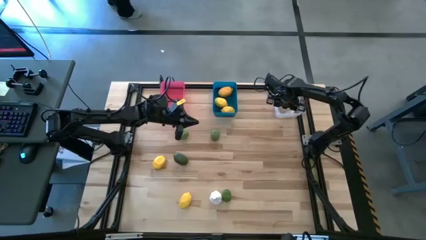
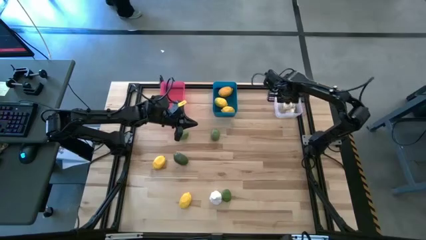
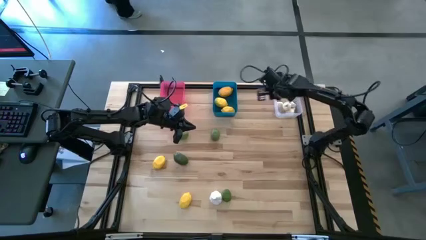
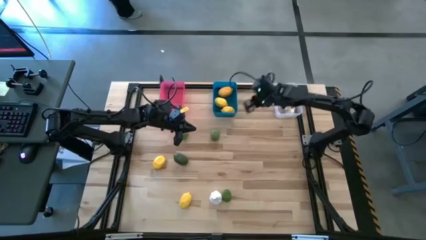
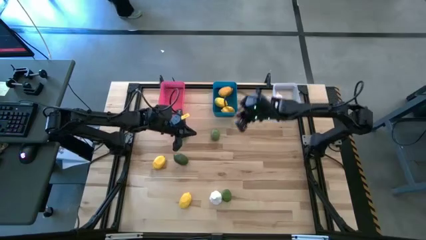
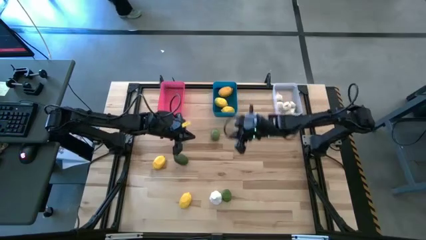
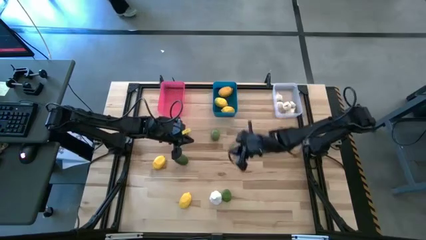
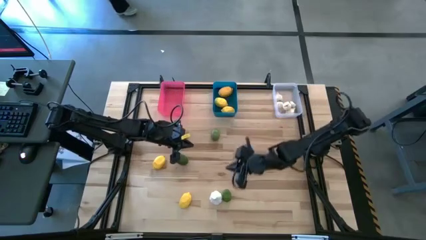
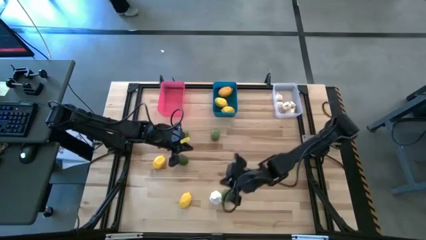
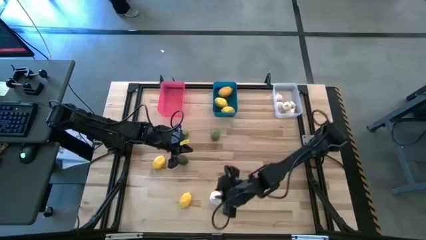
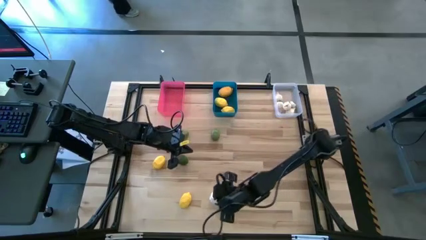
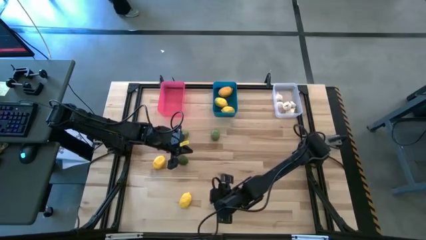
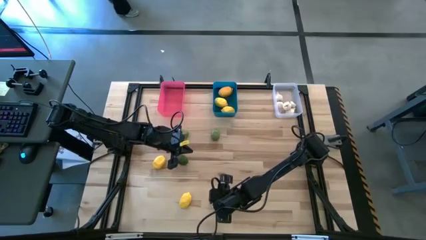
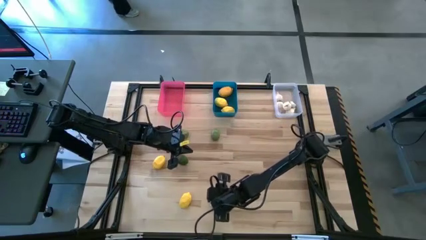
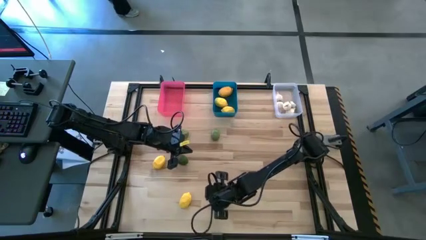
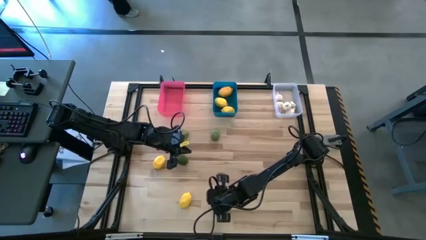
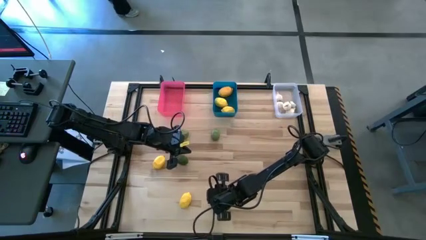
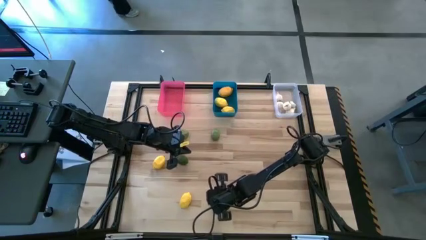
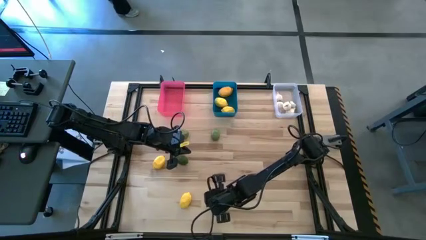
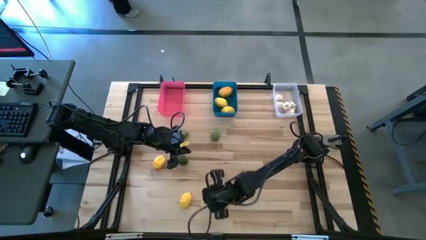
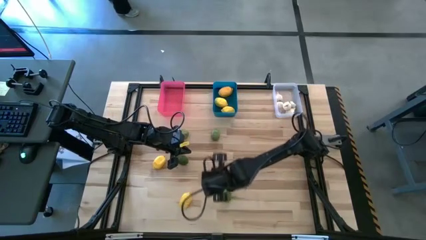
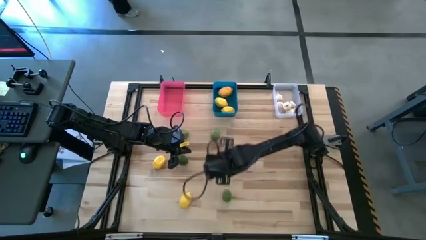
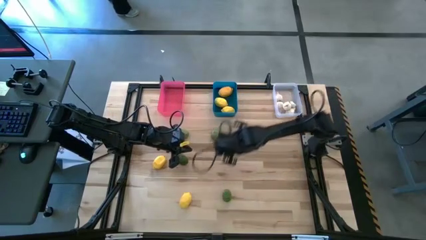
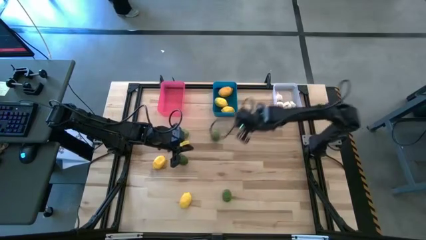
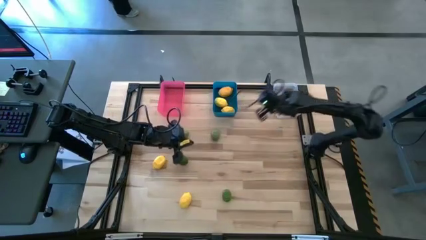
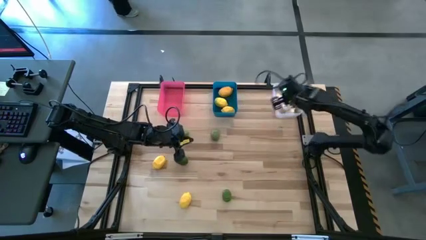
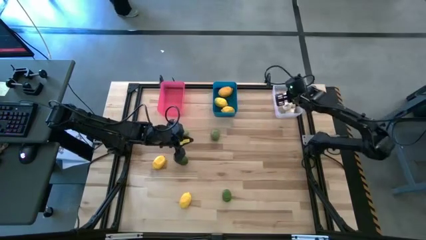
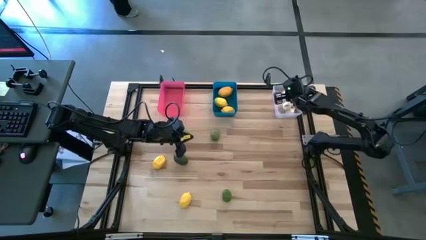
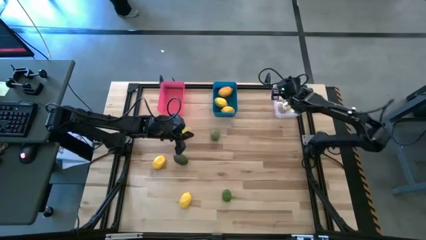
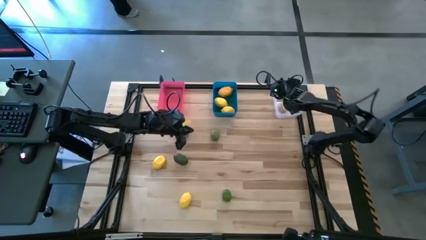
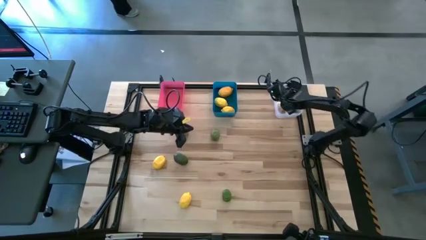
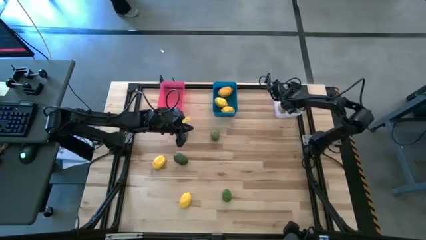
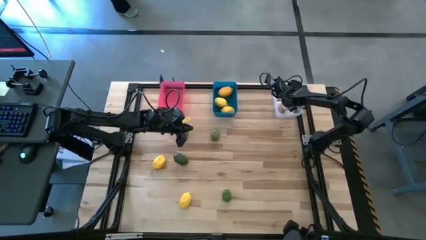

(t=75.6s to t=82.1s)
Task: Sort produce into baskets
Put the garlic into the white bin

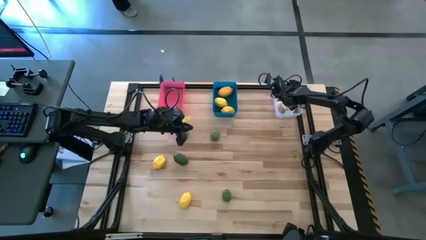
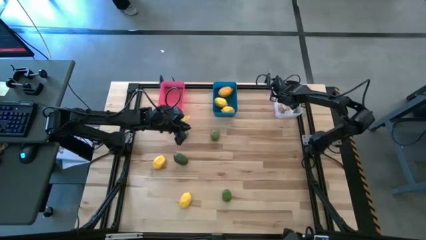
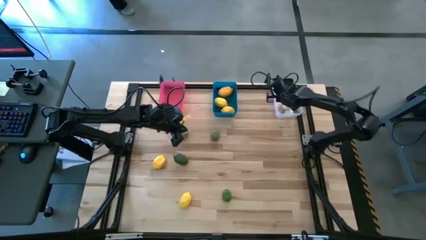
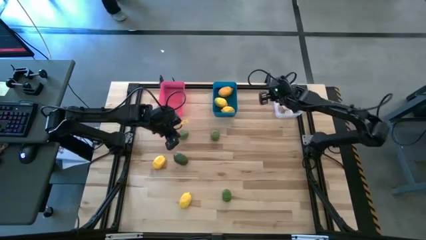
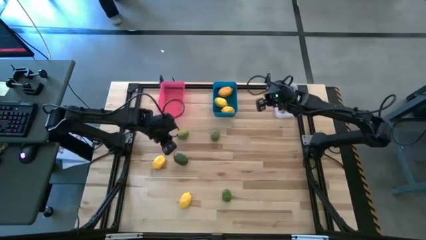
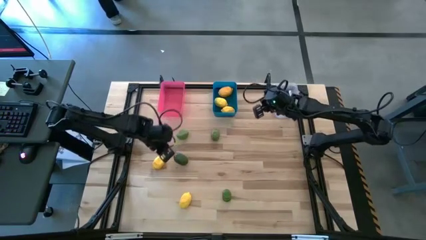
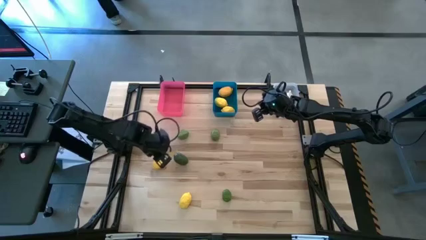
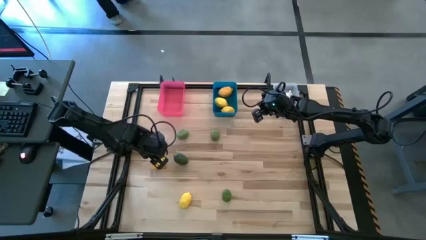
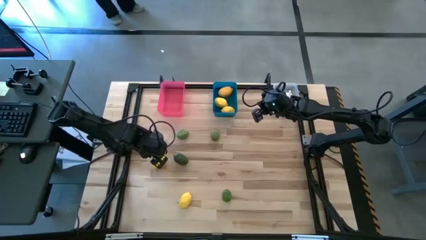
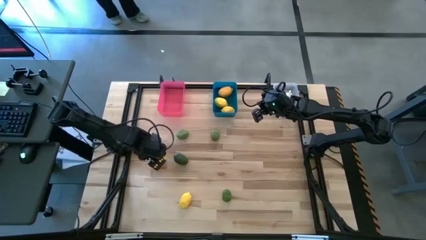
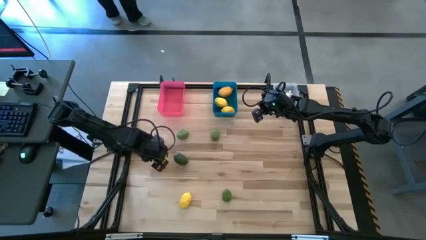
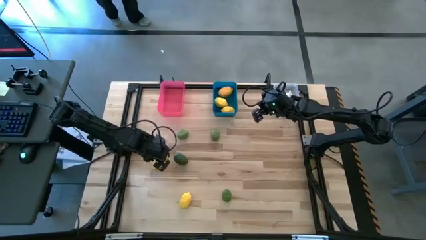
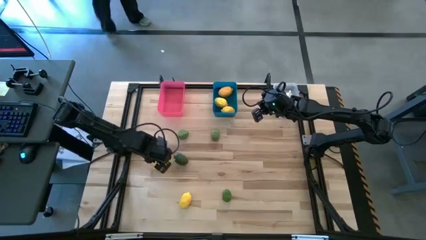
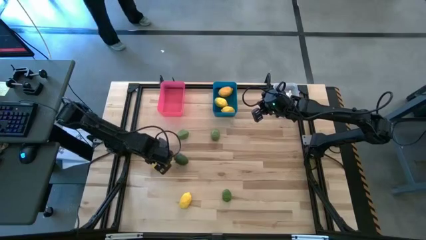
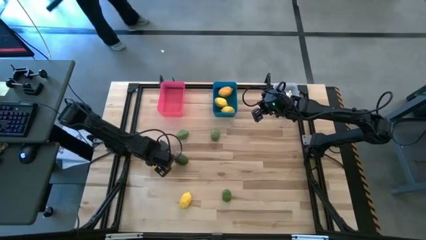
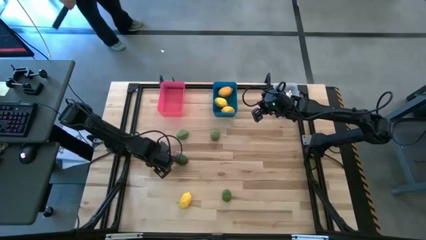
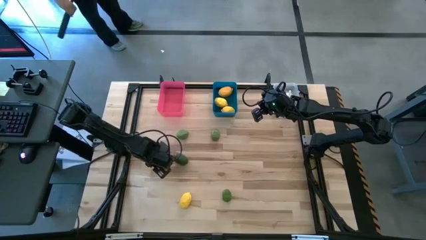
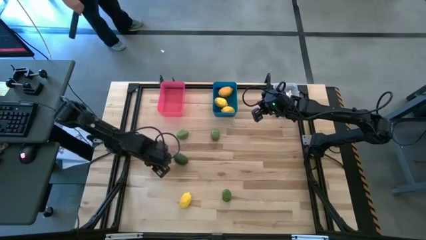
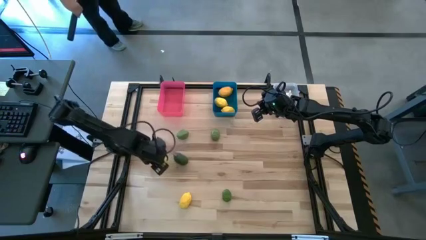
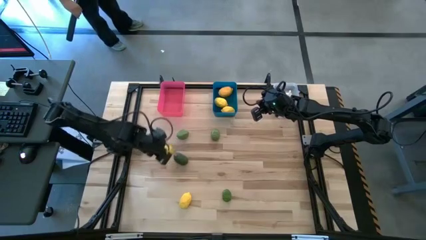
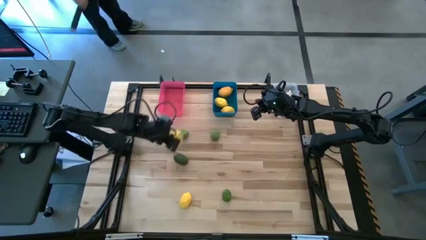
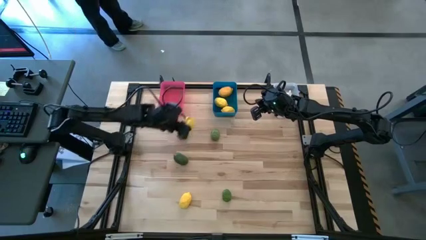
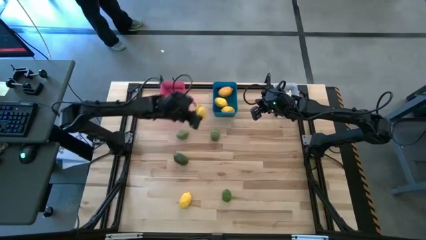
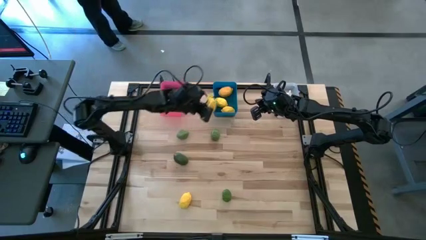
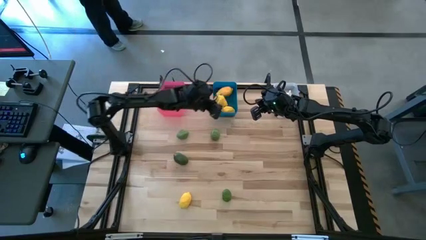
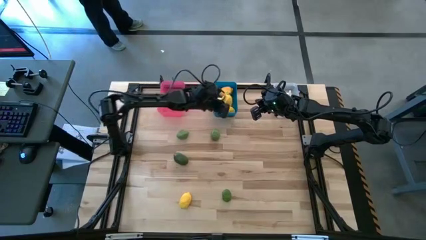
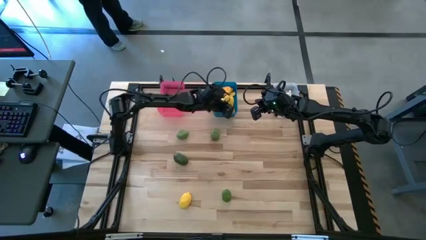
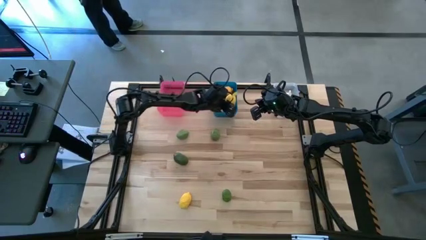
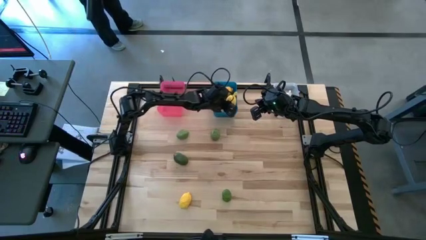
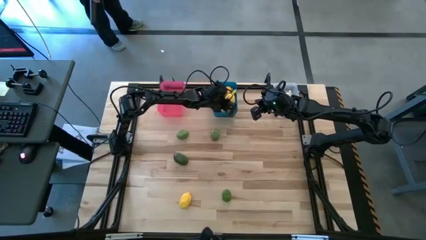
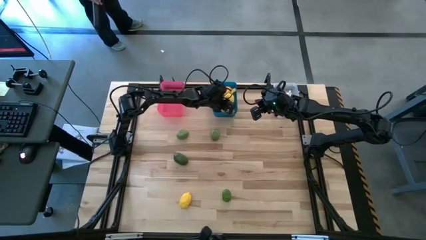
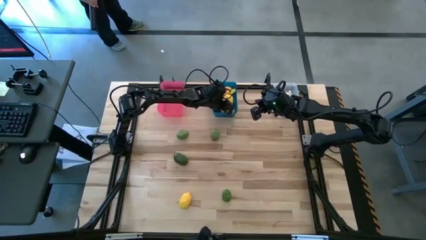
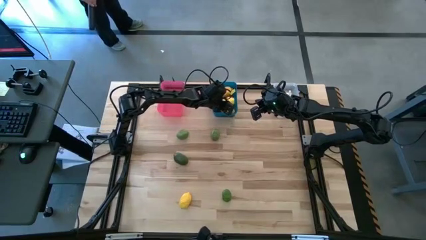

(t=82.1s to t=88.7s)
Put the lemon into the blue bin

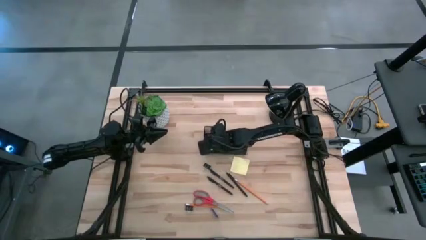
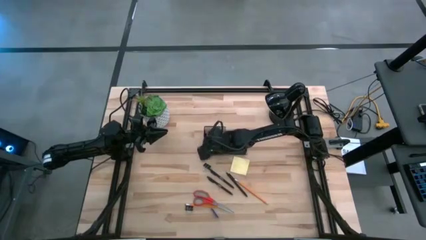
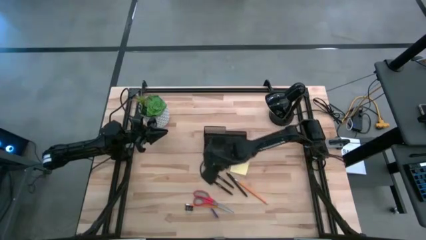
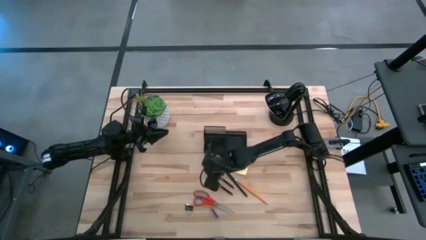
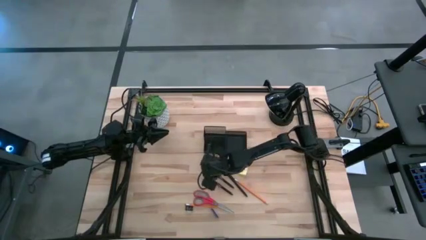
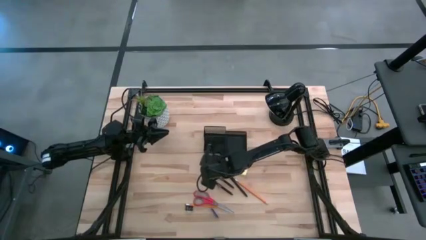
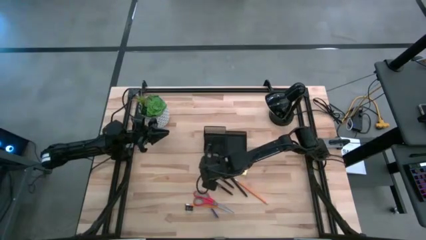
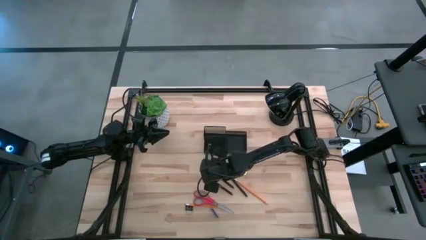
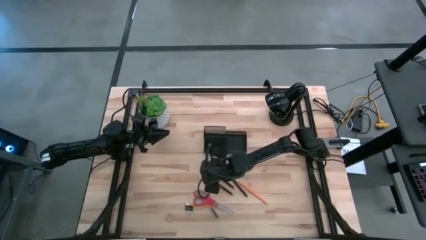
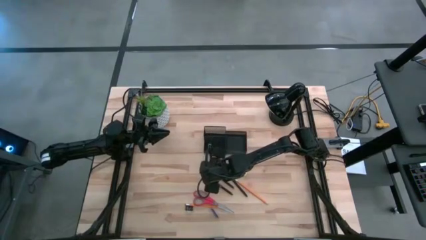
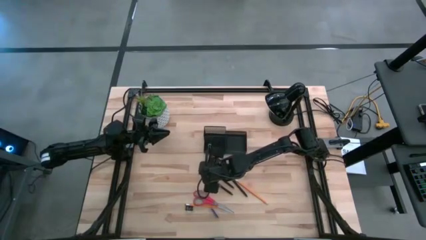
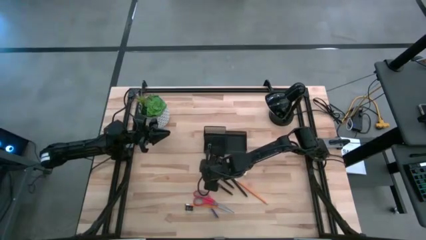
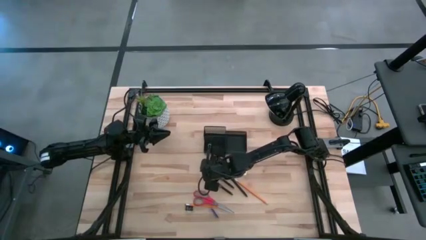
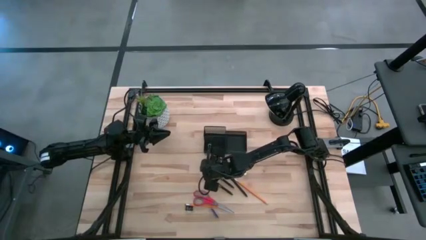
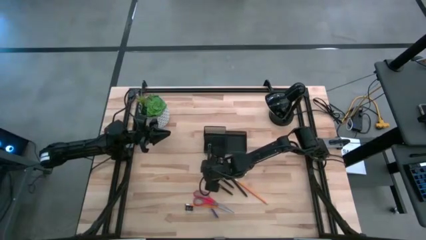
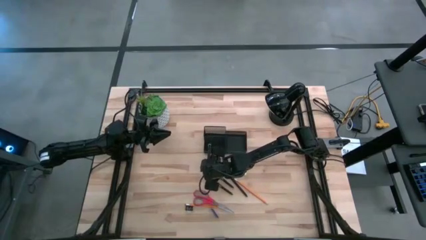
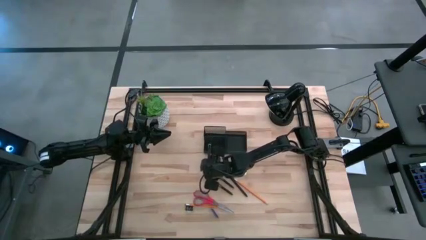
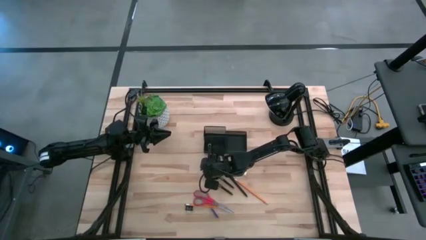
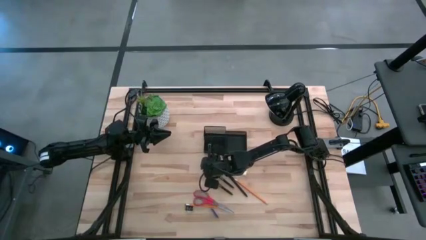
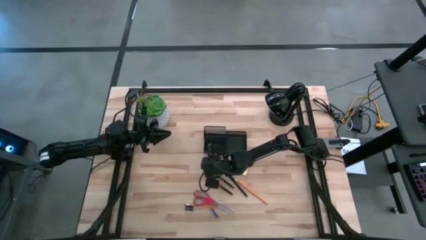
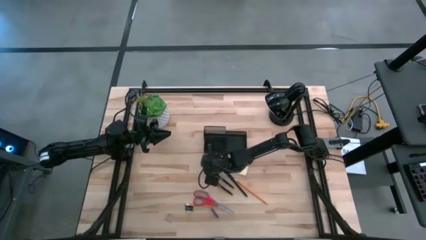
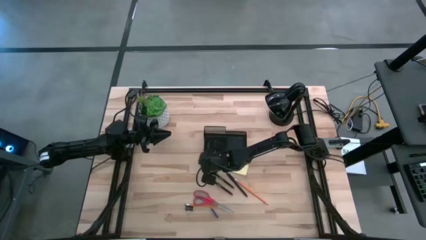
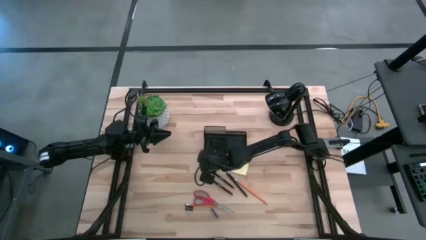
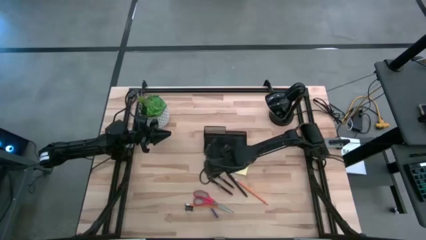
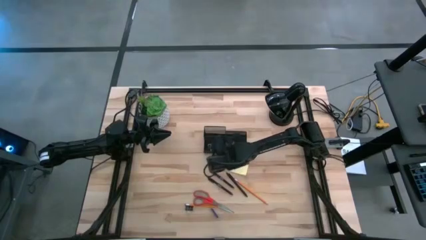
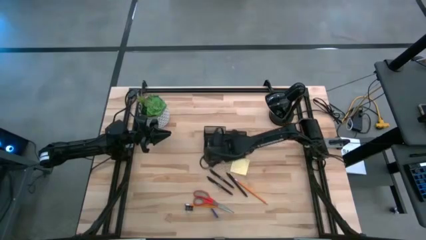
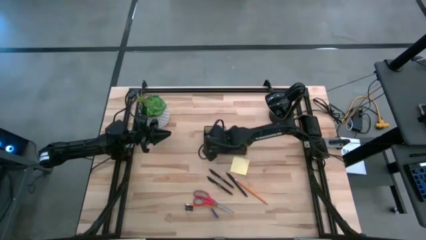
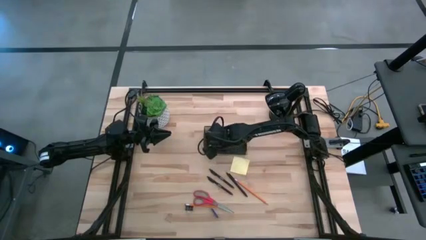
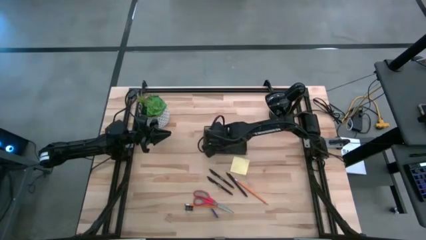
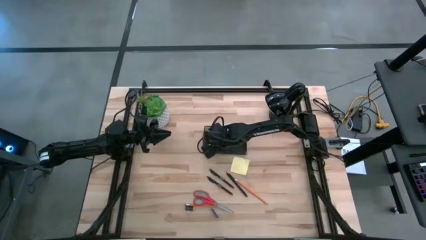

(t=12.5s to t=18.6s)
Task: Pick and place office supplies into organizer
Put the top black binder clip into the black desk organizer
